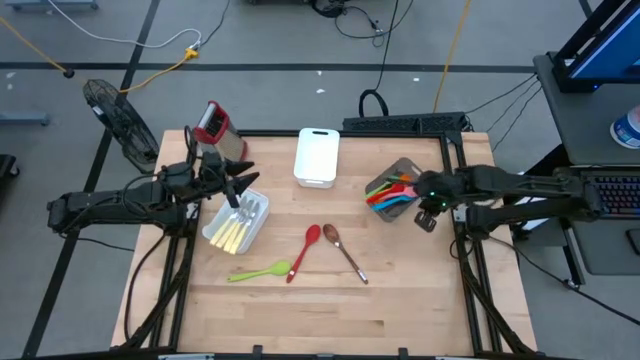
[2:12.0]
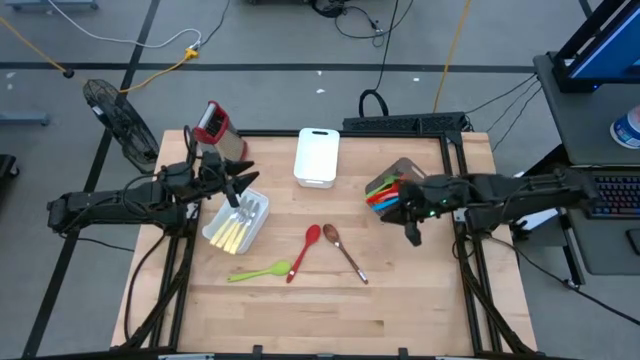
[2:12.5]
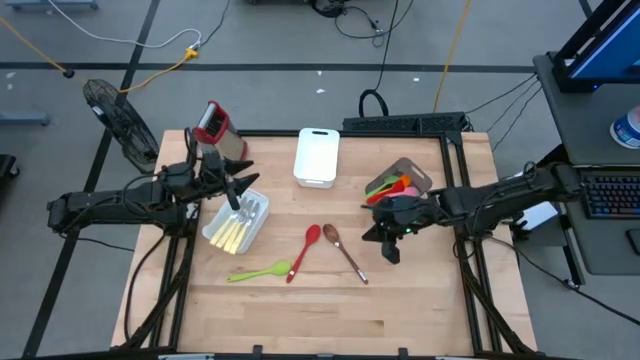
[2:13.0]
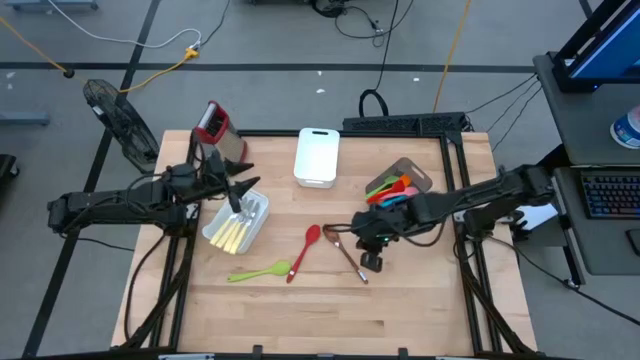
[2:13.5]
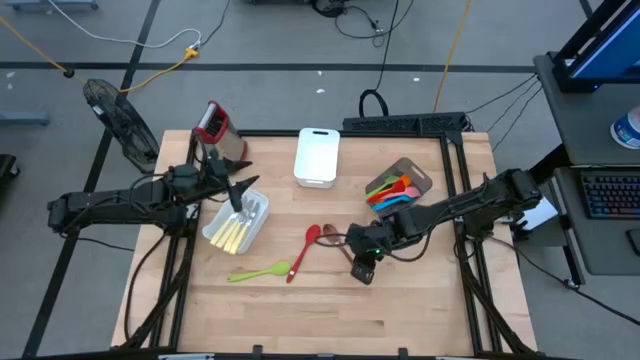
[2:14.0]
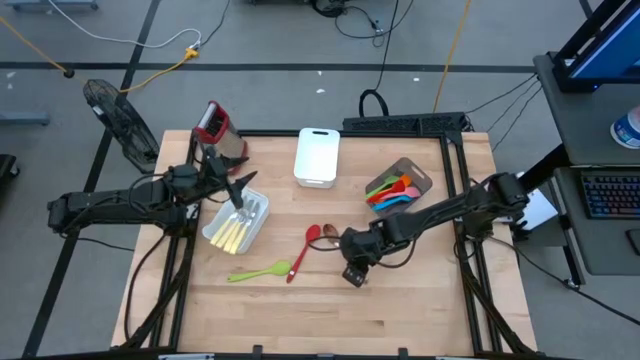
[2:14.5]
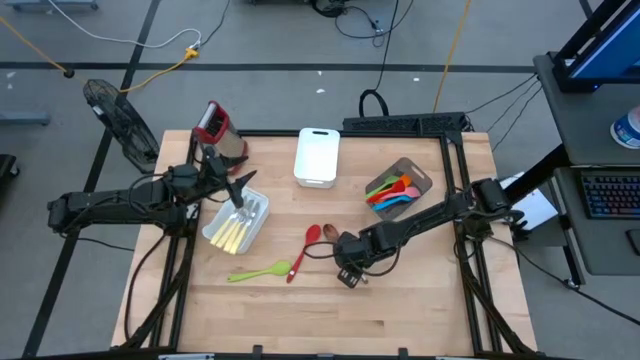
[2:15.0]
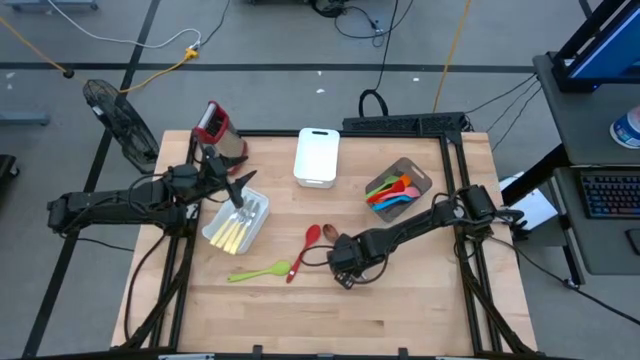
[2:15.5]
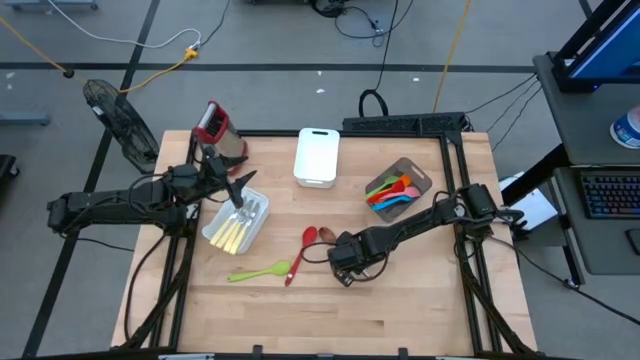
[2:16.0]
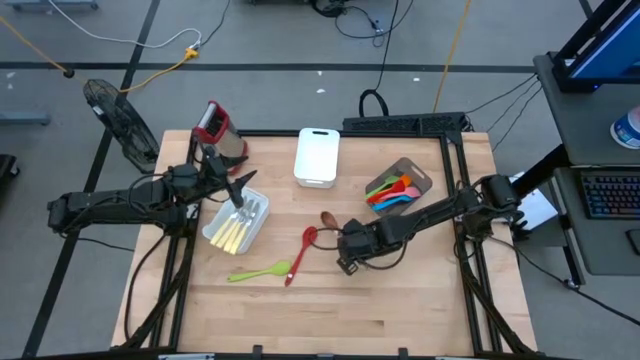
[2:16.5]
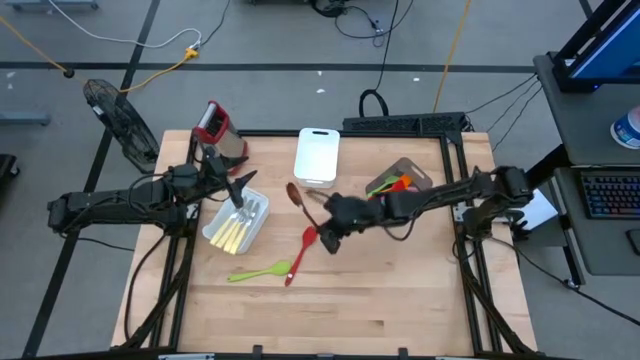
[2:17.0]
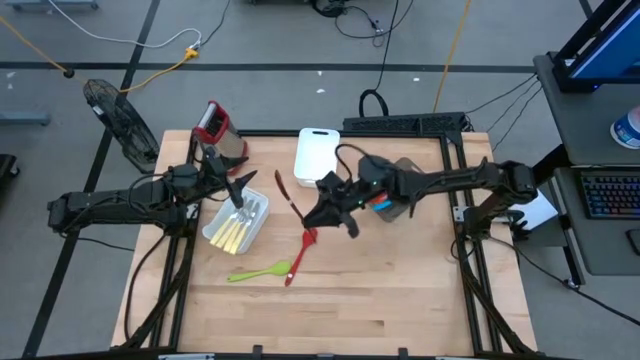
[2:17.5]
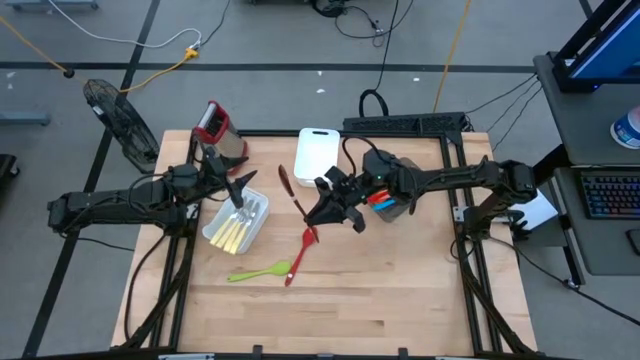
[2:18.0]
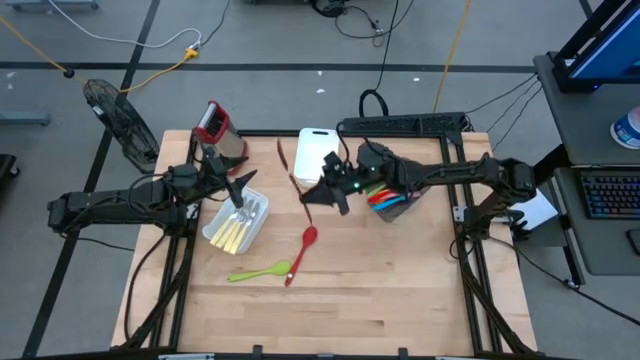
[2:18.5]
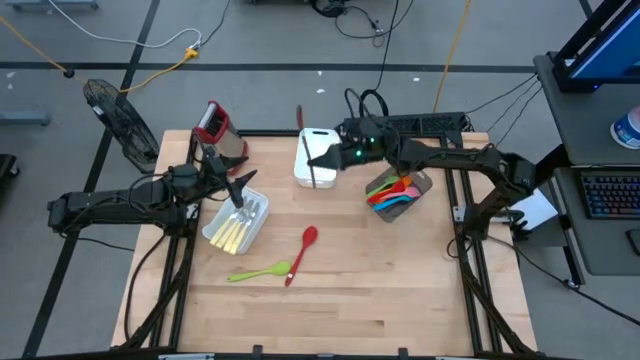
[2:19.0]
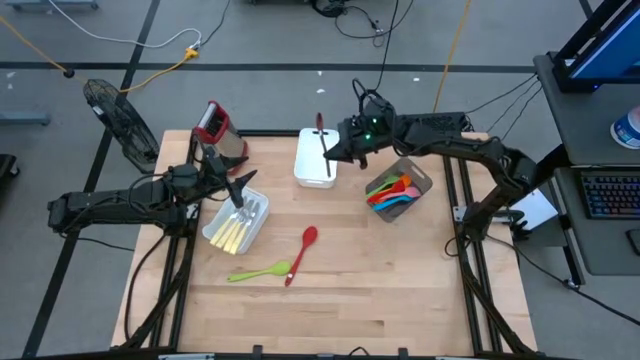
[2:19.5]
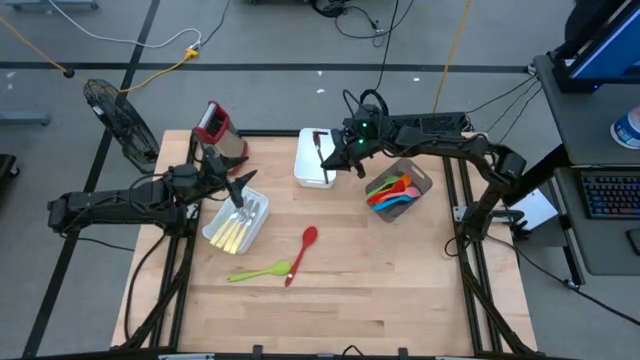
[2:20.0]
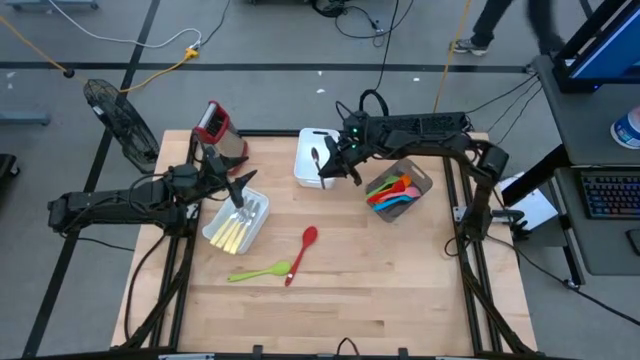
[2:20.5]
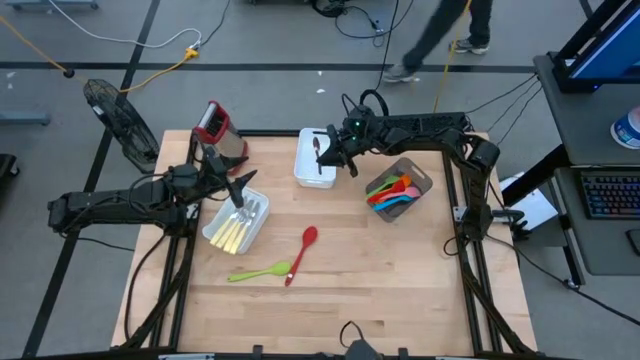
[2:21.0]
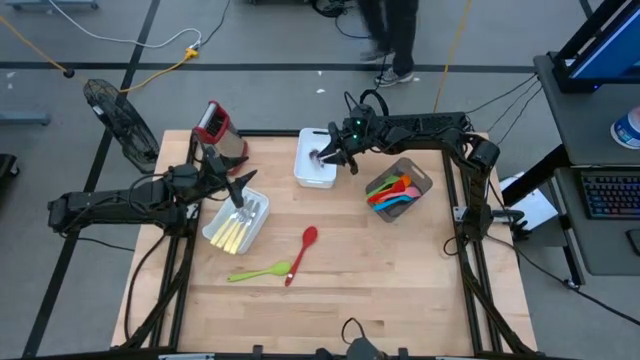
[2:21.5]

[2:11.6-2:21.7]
Task: Pick & Place Kitchen Items
Put the brown serving spoon into the top white bin

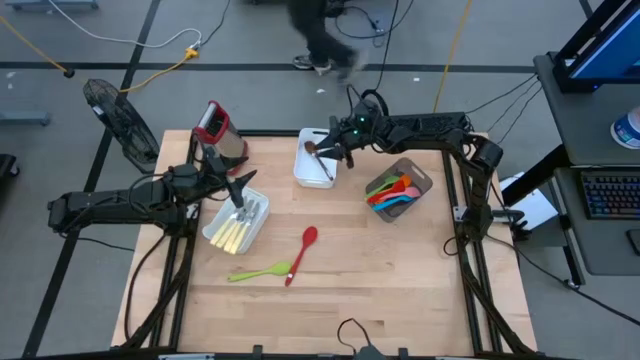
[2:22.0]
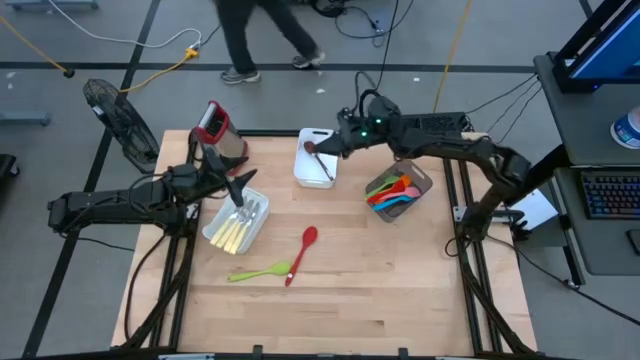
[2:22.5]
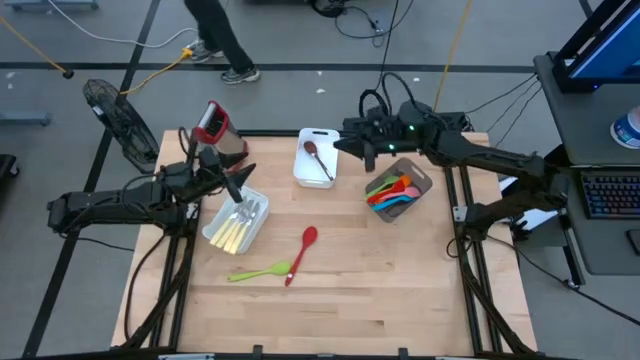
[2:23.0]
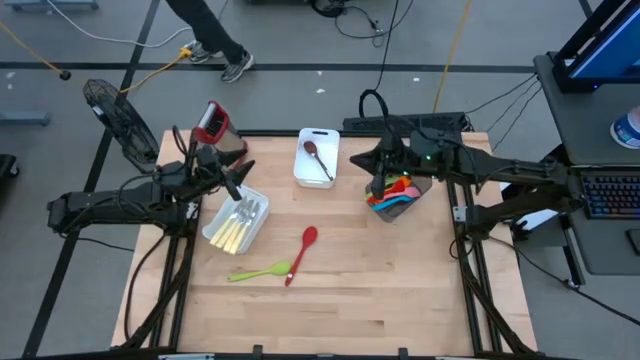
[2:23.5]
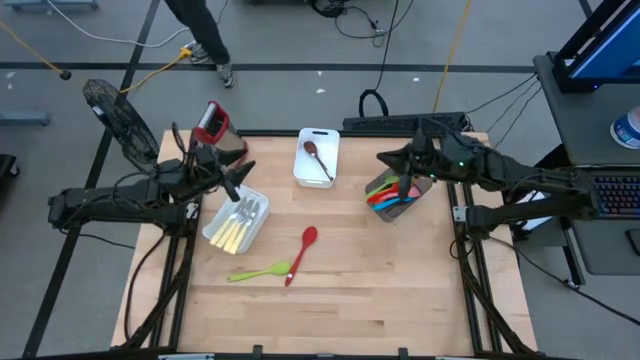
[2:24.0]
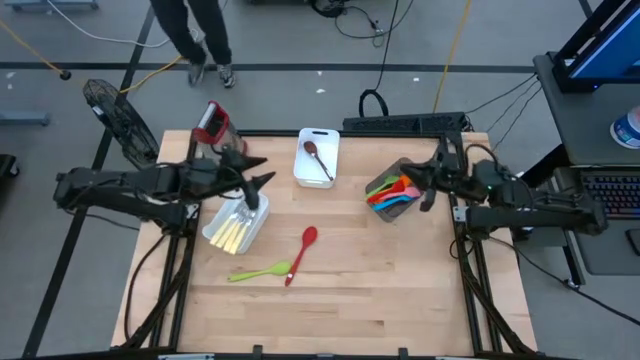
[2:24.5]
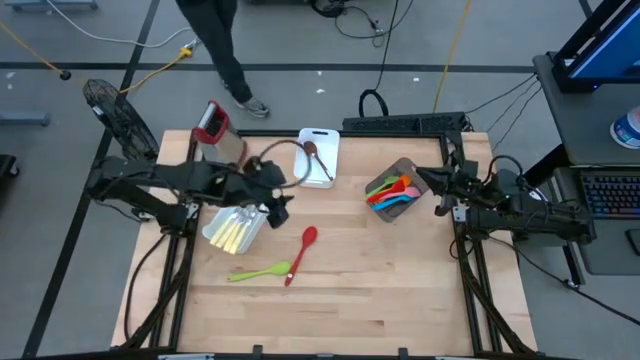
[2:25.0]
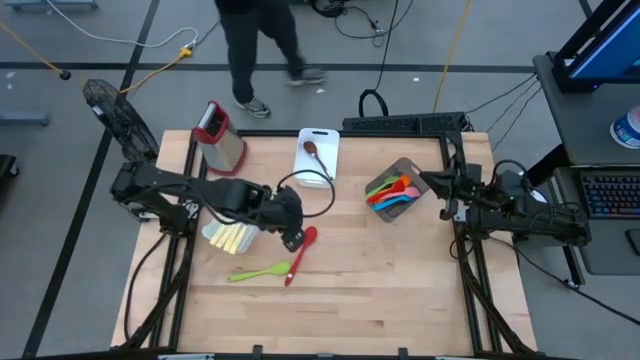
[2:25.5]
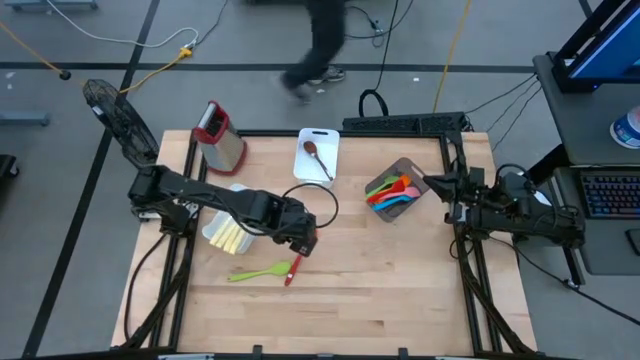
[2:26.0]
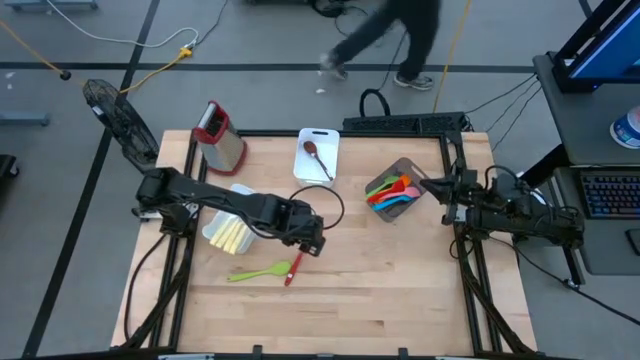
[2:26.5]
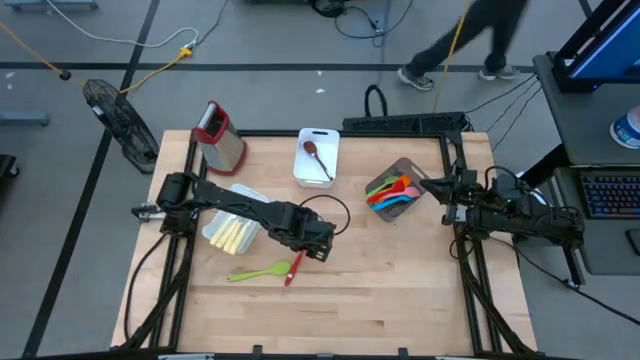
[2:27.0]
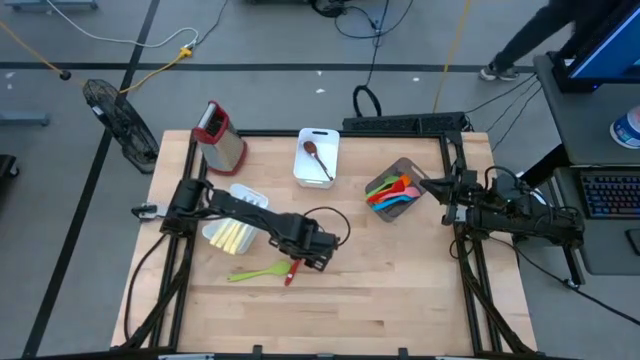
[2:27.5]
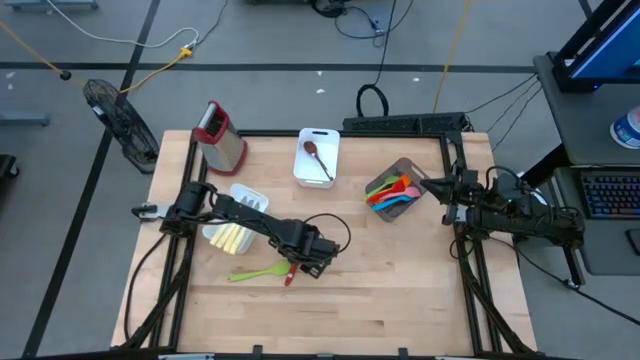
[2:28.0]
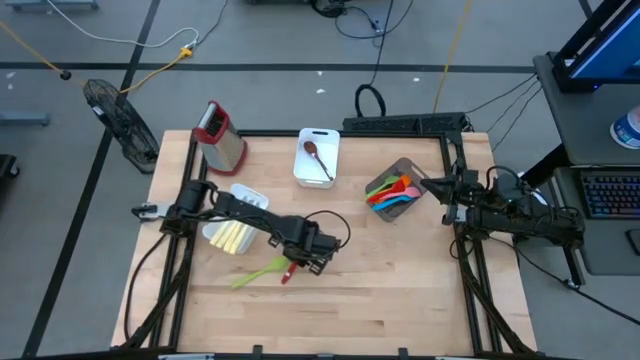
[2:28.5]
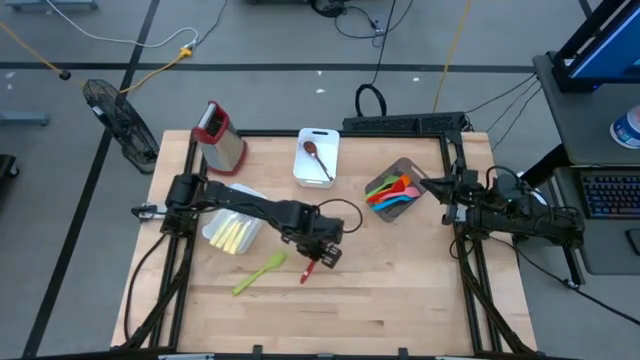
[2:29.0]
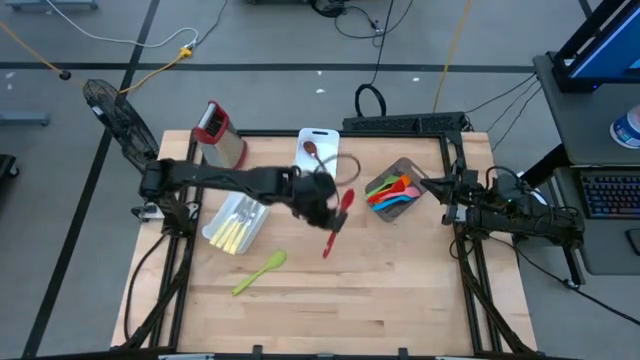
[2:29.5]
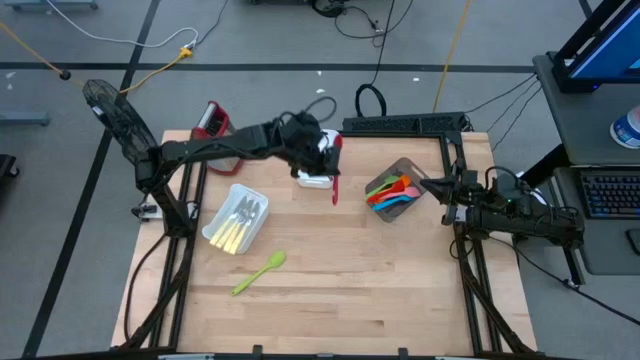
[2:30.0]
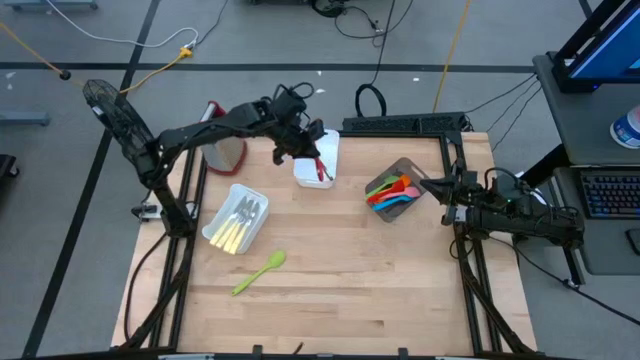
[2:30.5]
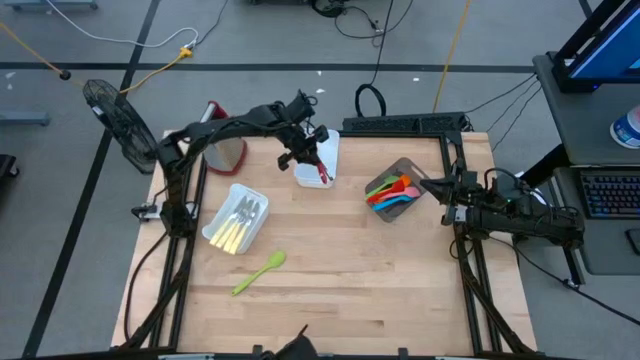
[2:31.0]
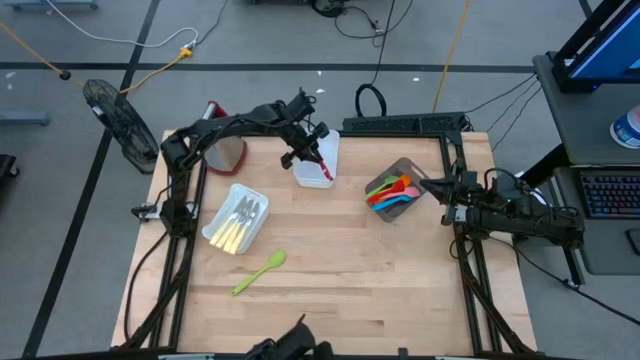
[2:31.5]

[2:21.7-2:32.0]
Put the red serving spoon into the top white bin

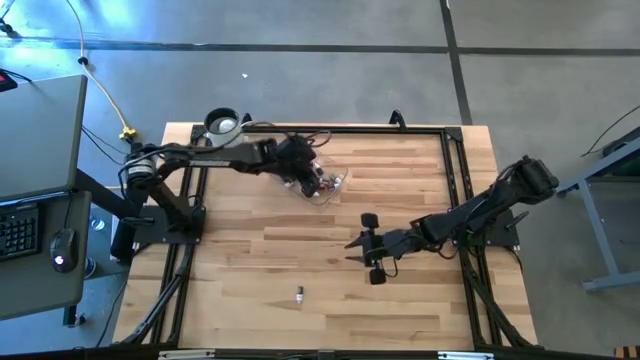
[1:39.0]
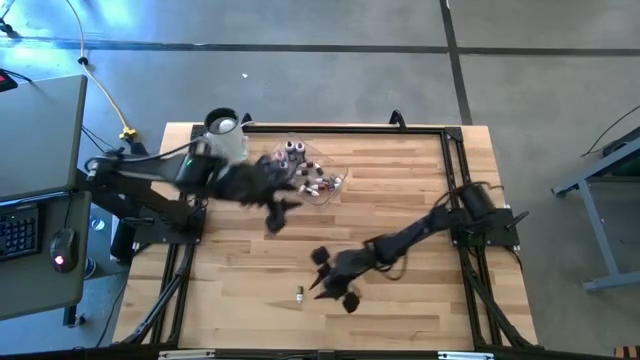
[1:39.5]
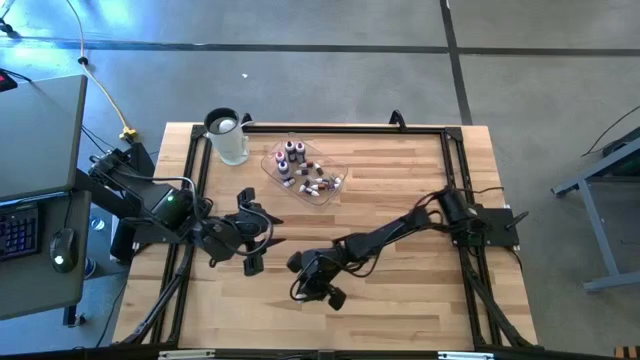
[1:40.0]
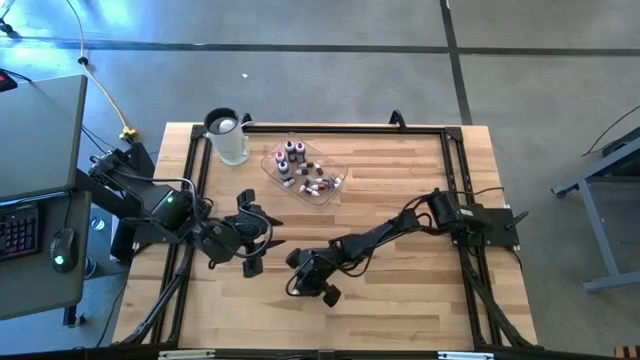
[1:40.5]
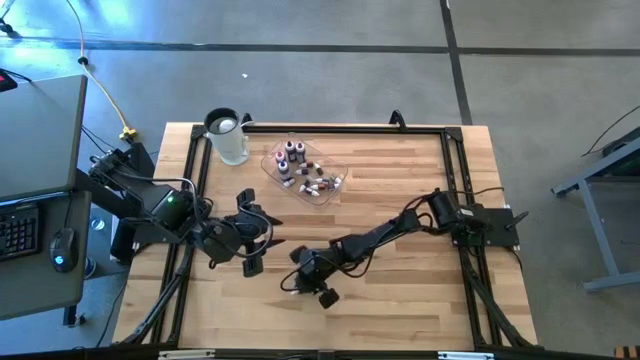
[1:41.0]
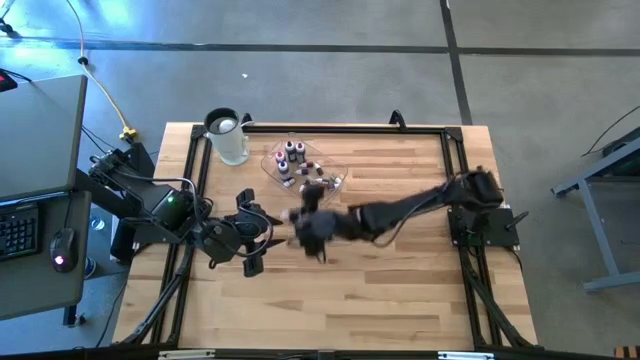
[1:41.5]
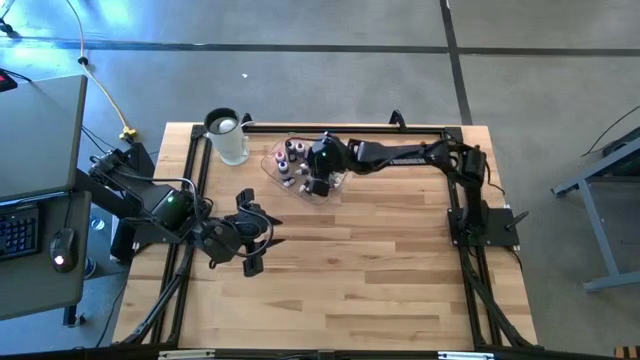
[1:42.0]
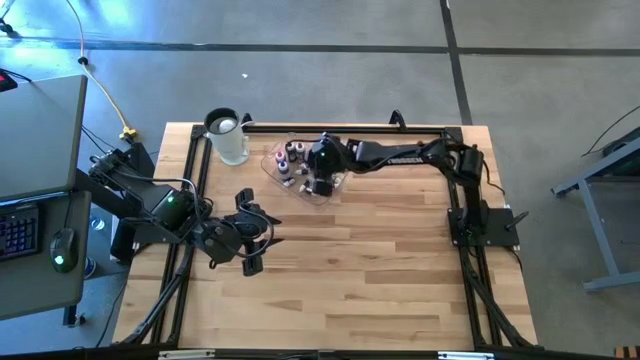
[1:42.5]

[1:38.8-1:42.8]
Task: Pick & Place food coloring
Put the small green food coloring bottle into the bin
